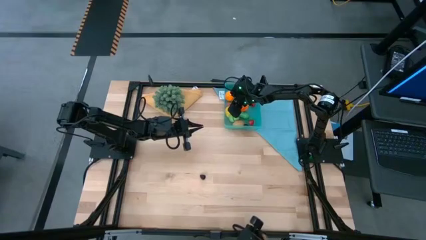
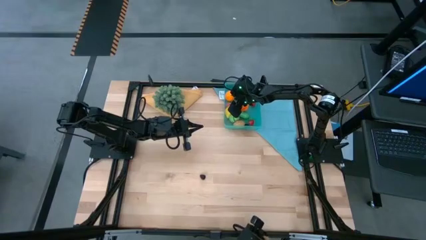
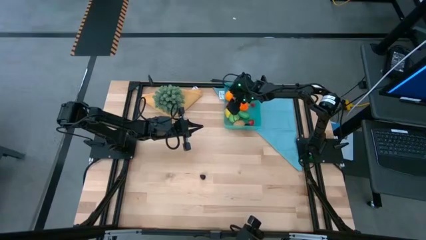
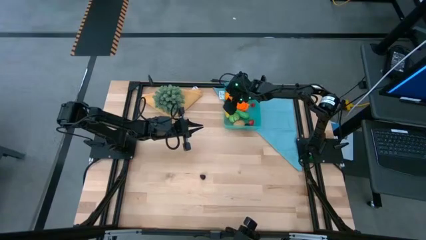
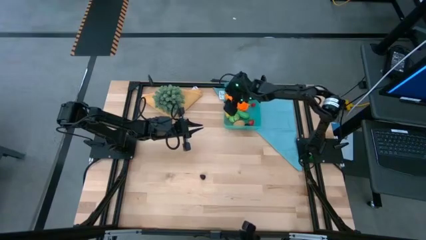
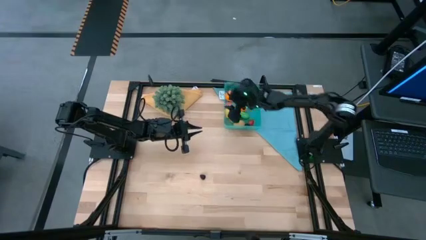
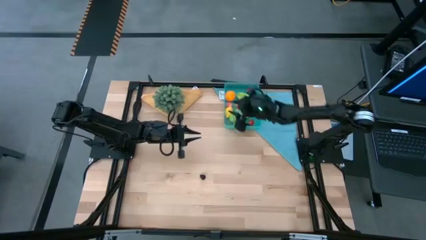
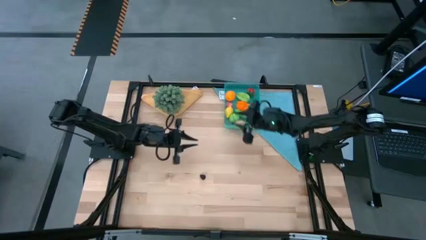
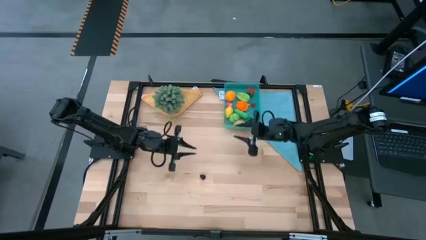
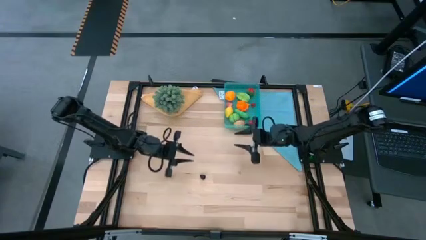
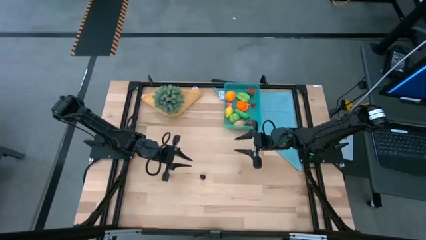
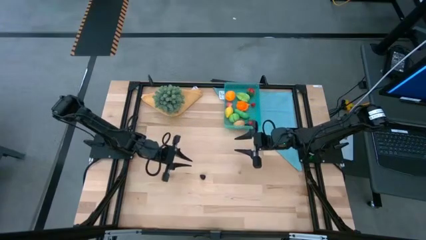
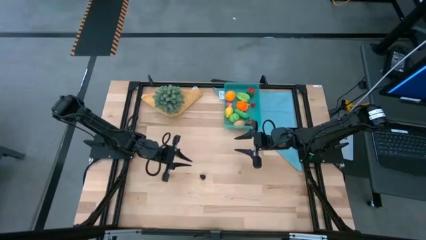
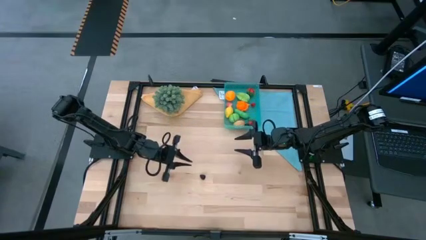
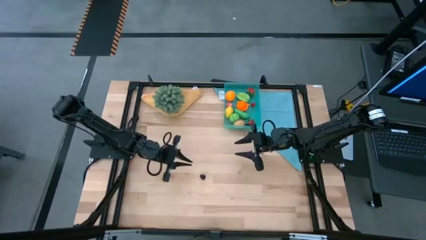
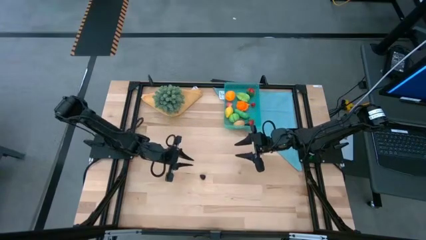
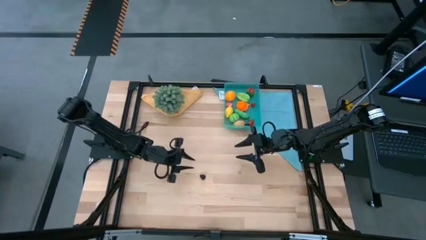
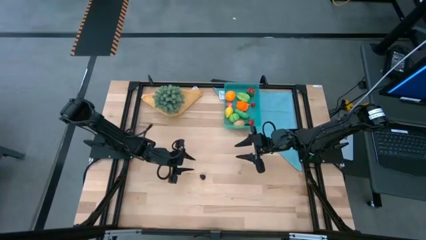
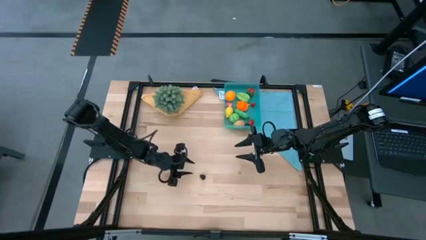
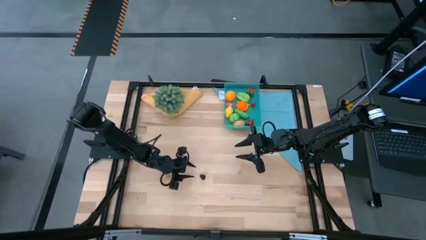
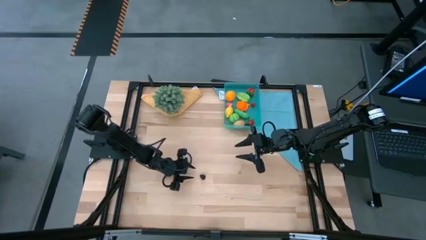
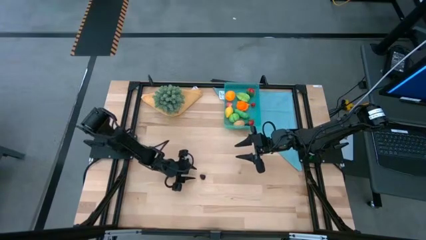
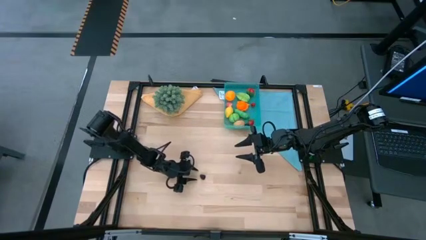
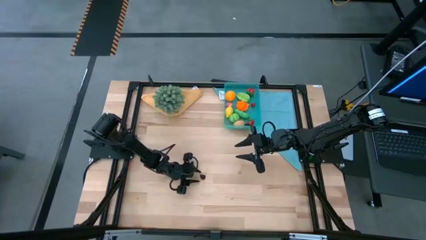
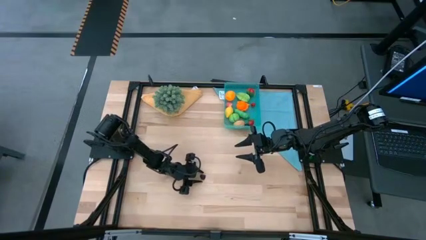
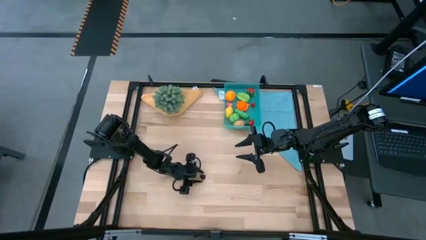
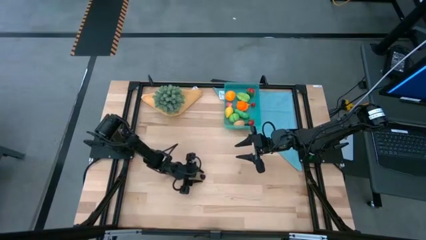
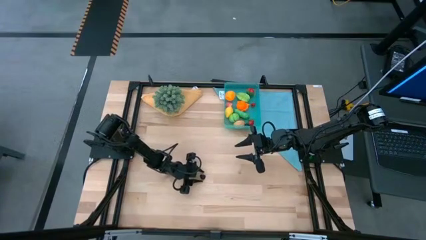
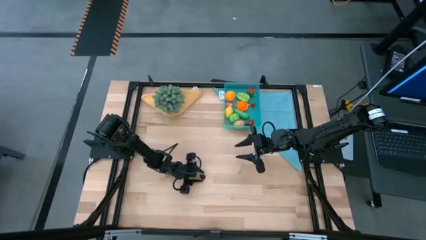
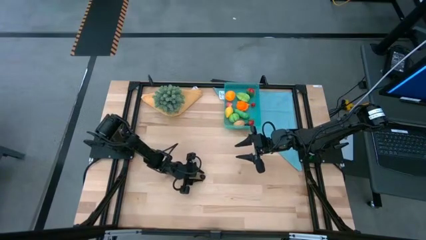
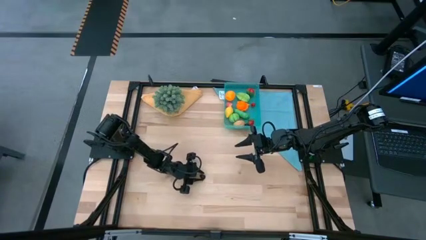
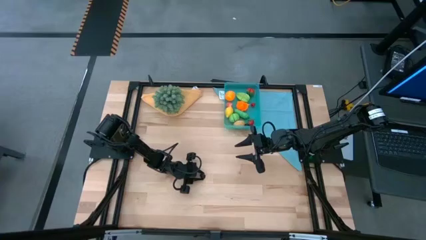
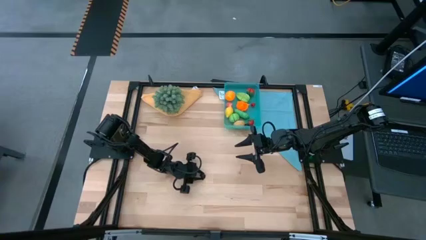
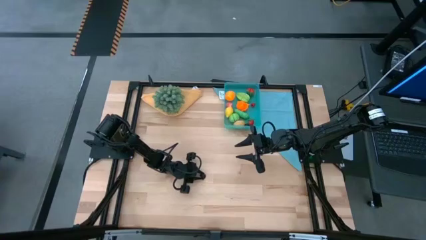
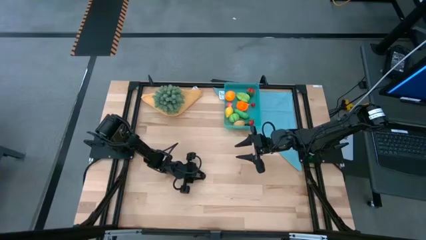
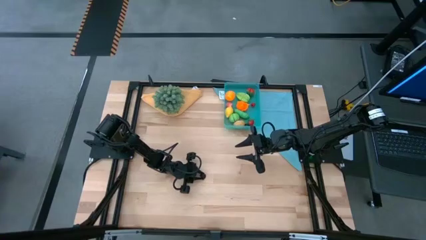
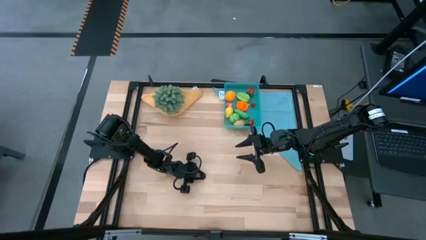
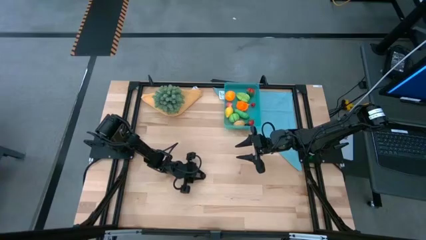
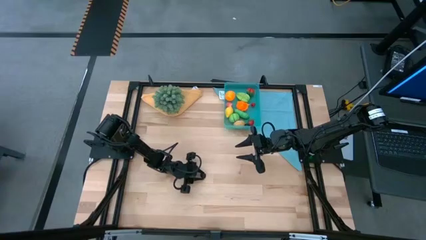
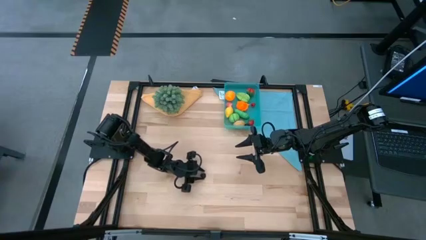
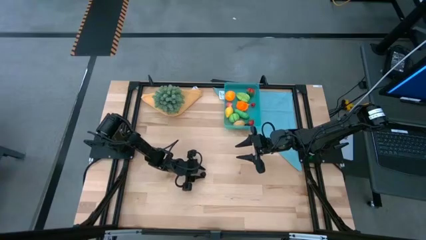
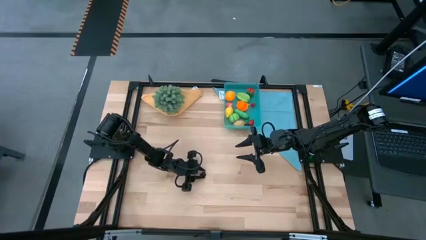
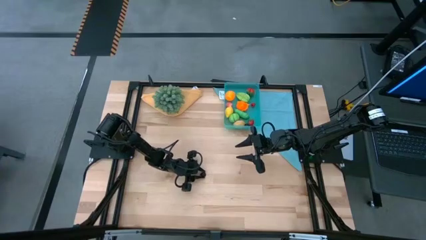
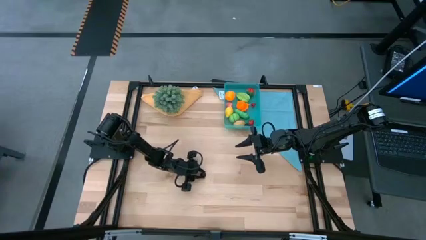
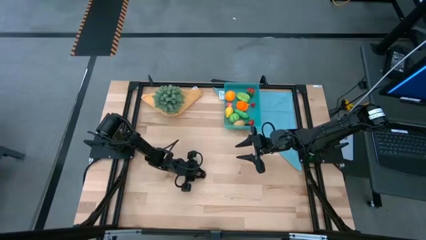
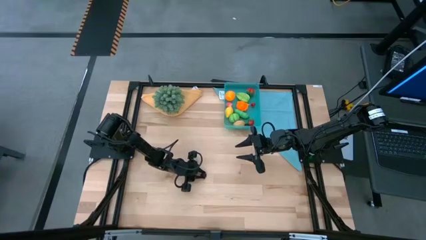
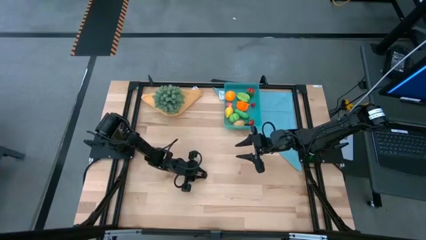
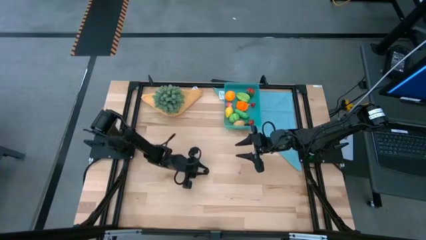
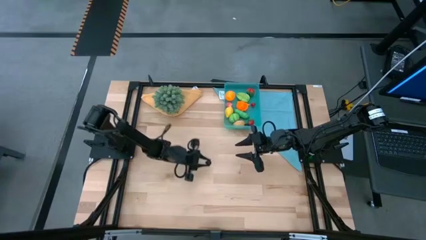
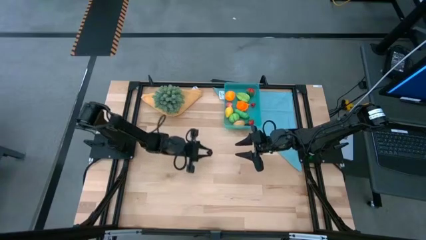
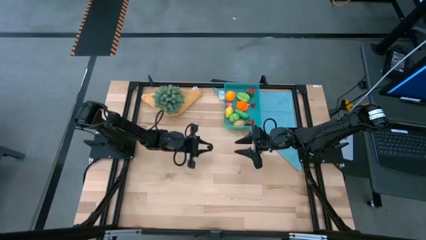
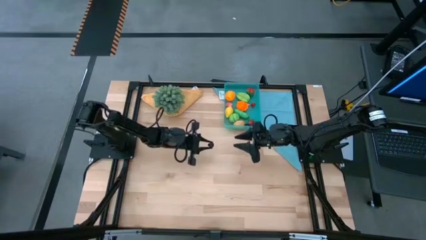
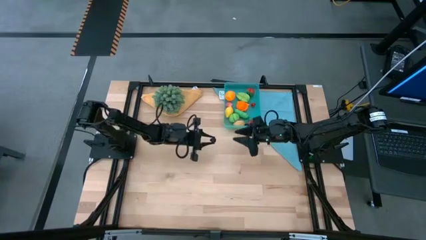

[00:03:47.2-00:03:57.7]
Task: Pick and placing Produce into tupperware
Put the blackberry into the blue bin

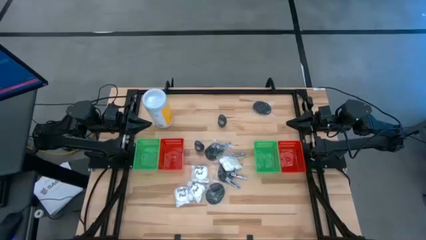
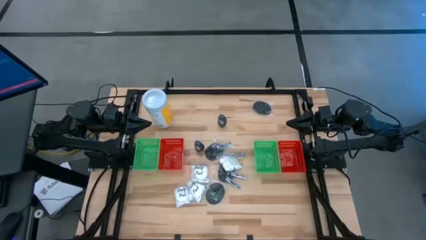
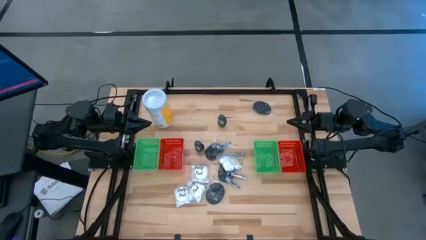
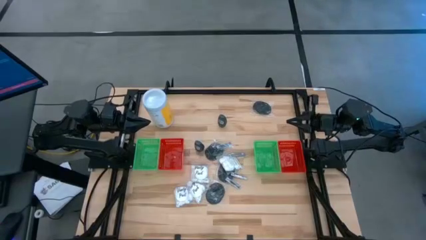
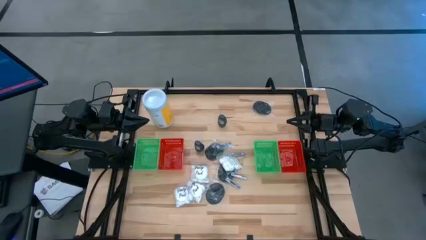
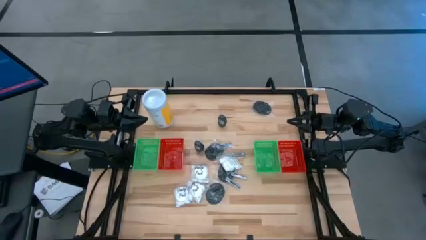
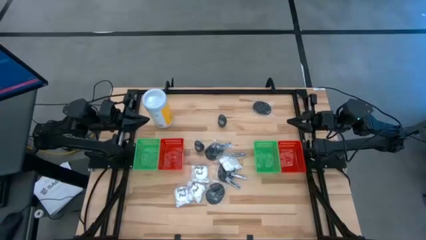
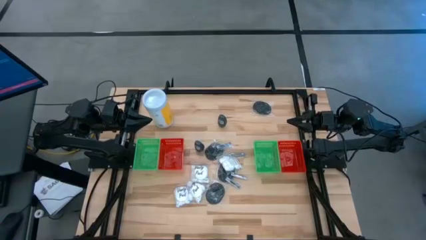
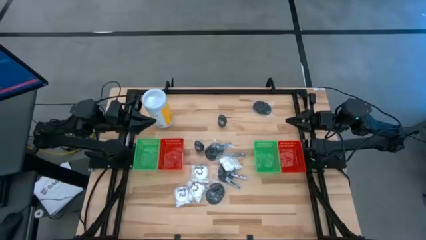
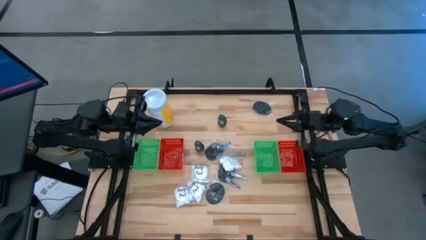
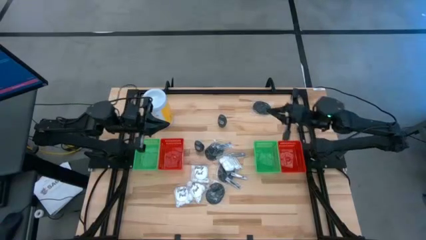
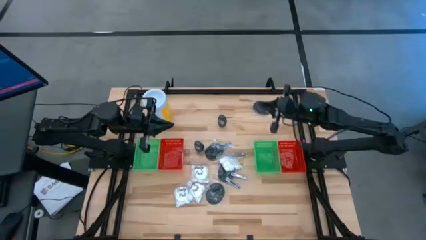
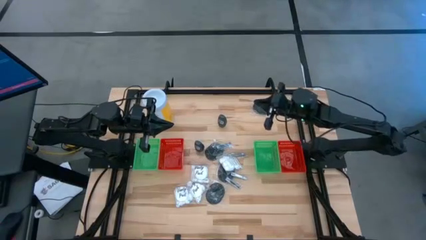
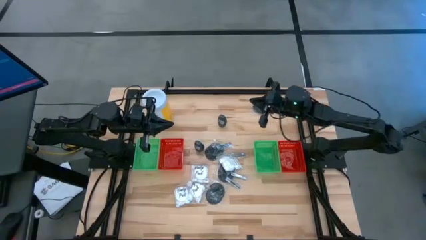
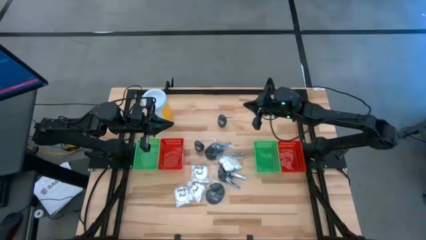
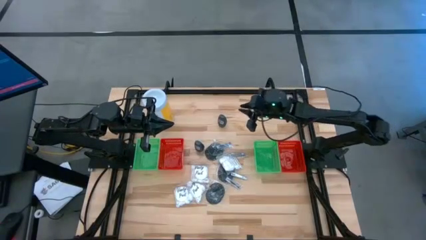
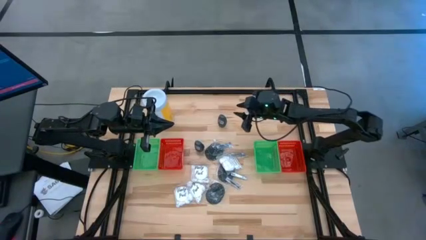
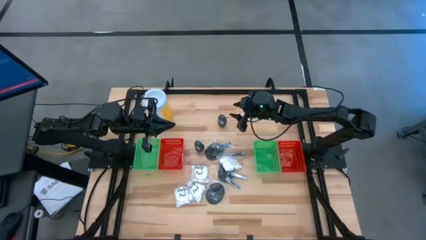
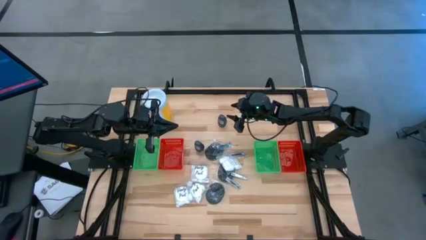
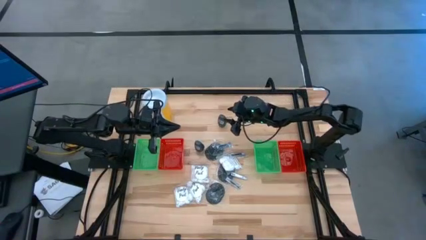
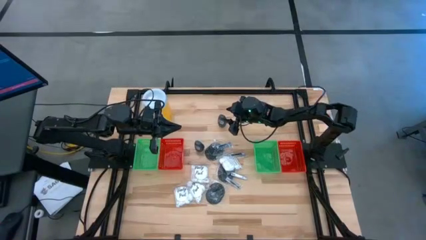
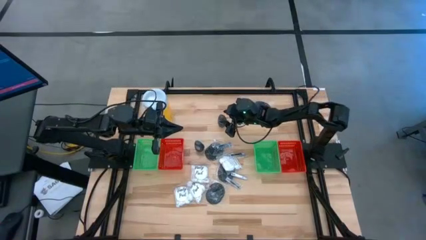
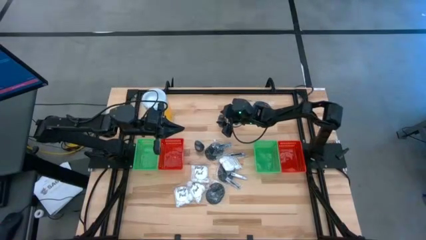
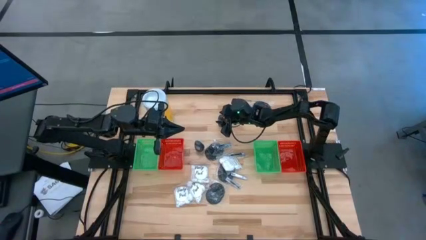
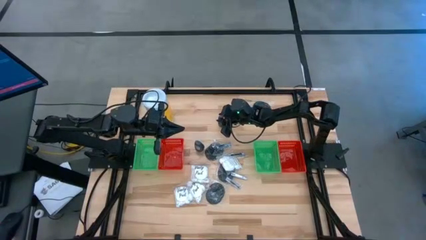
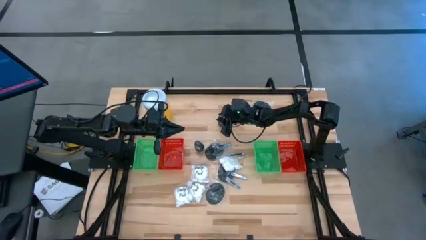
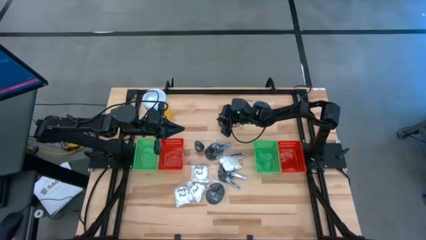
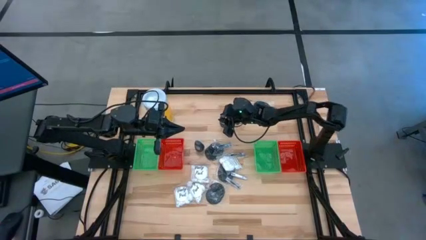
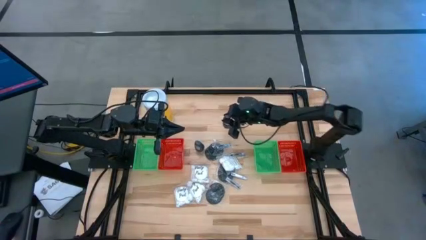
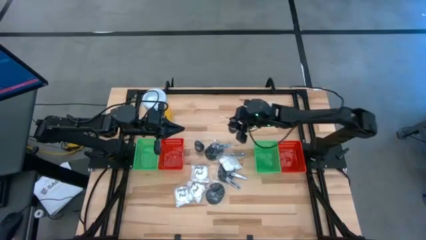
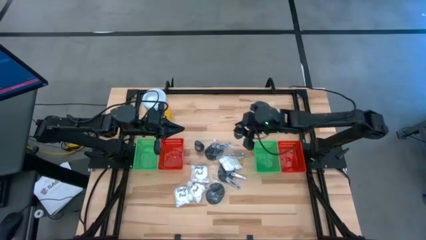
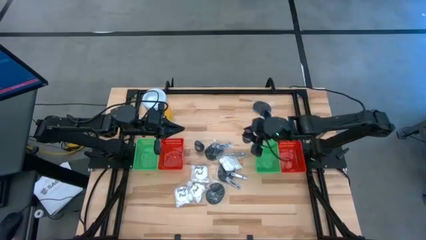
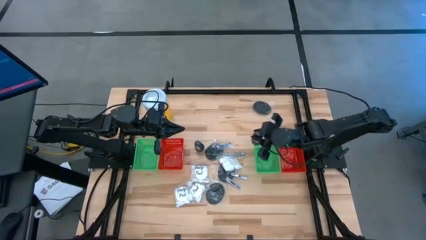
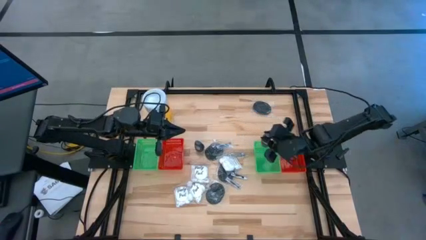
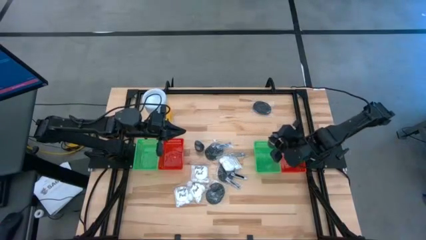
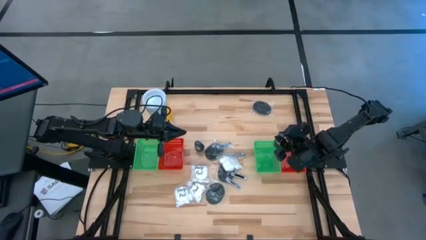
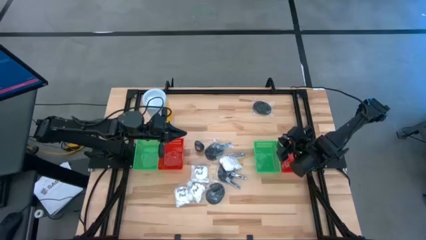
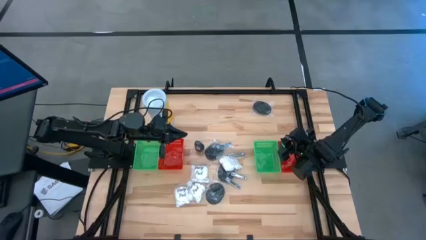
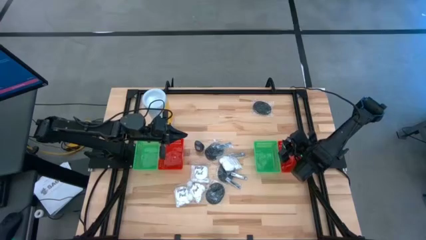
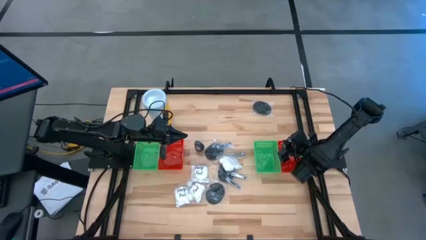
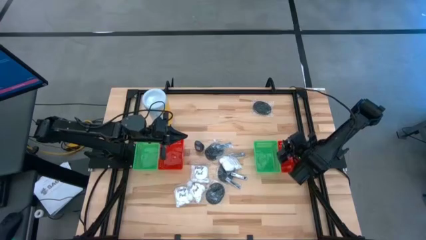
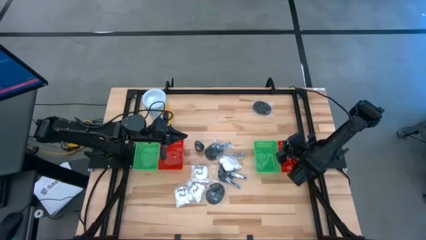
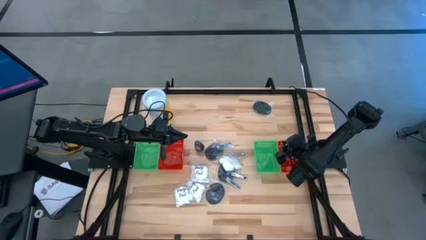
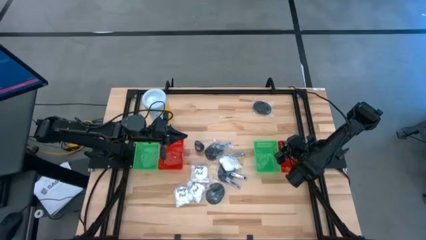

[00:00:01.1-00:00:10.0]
Task: Pick & Place Travel size toiletries
Put the gray deodorant into the right red bin
